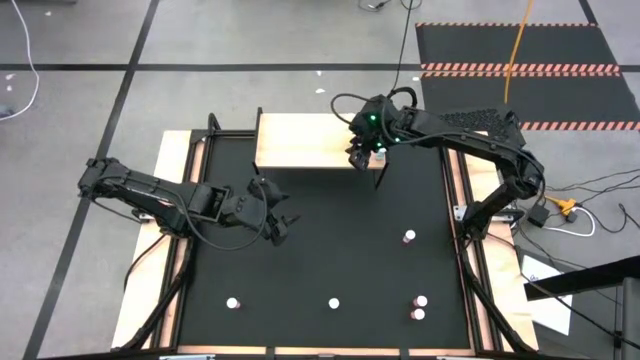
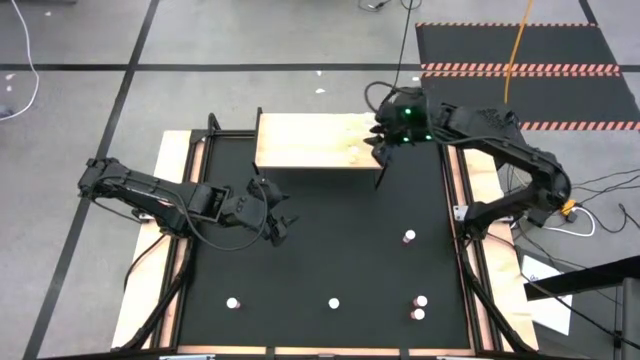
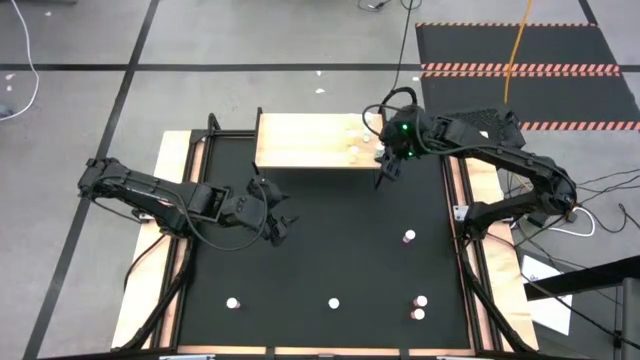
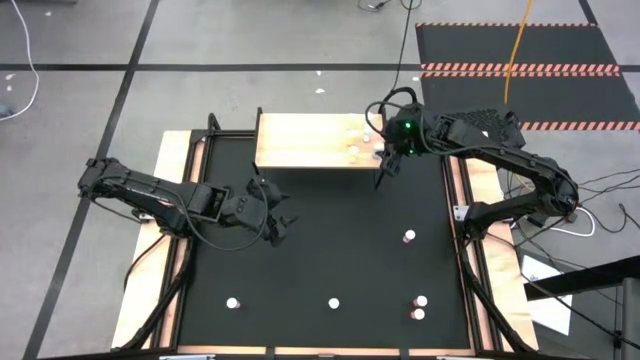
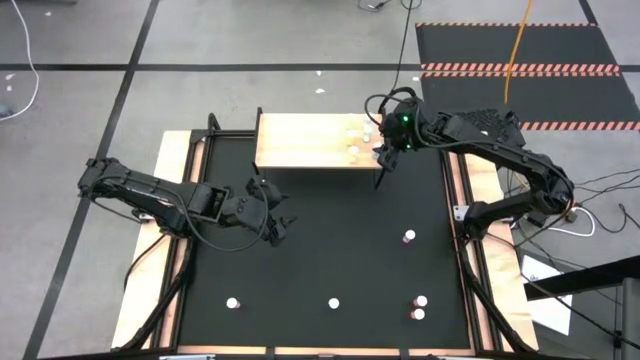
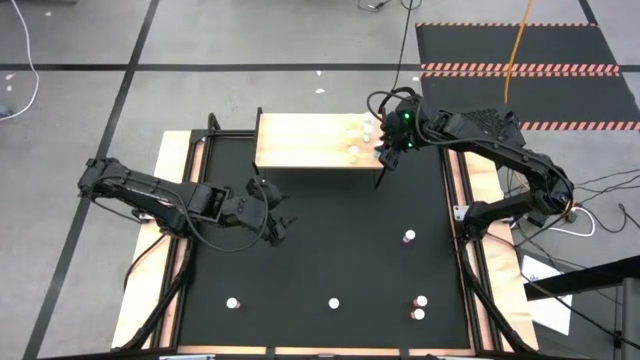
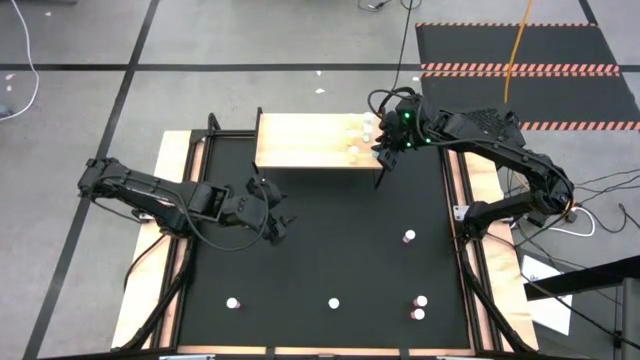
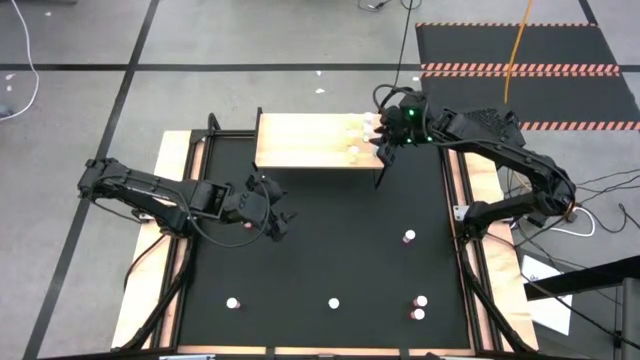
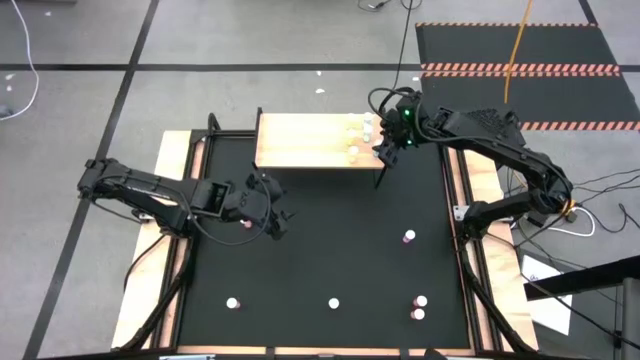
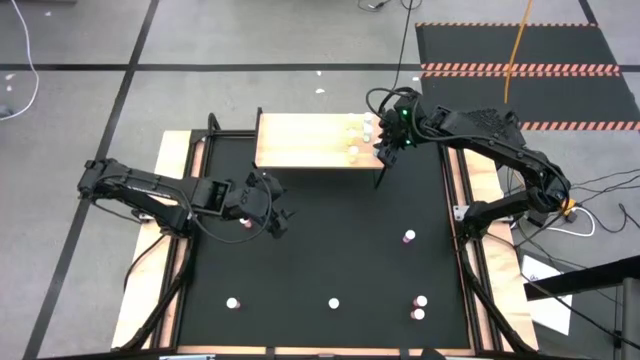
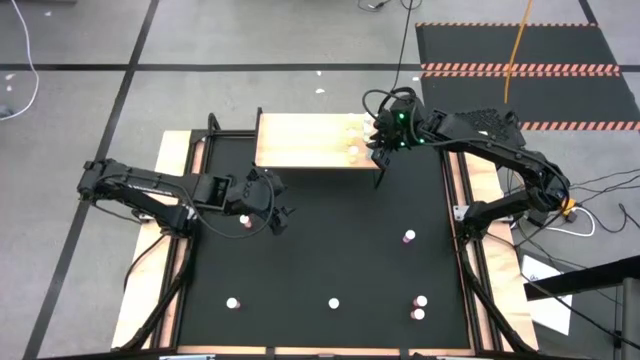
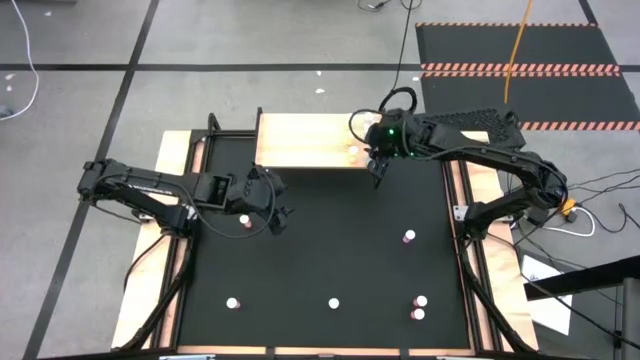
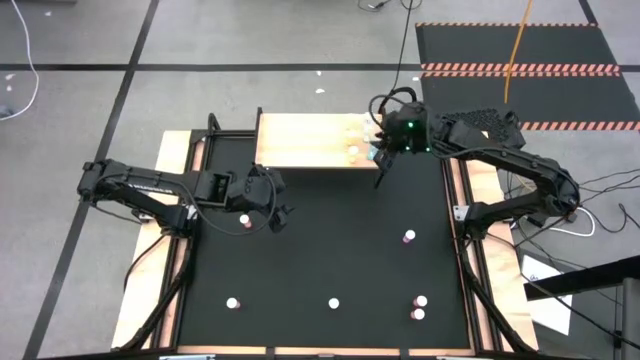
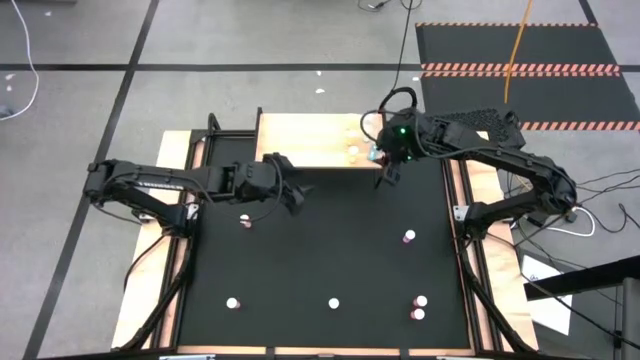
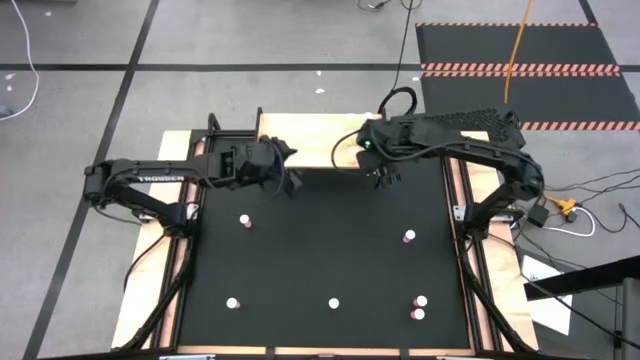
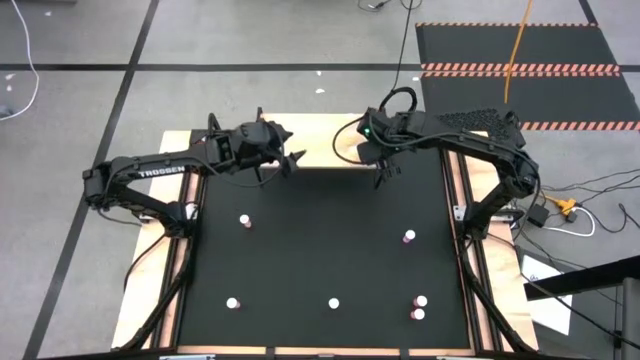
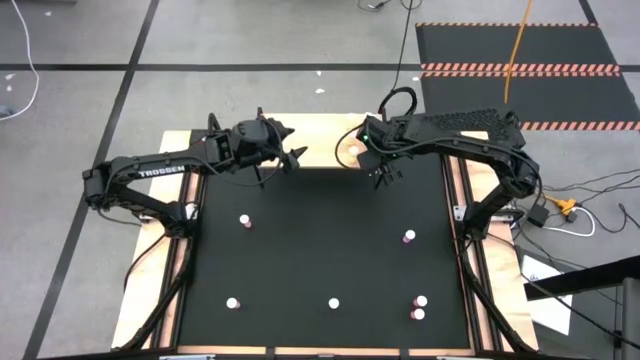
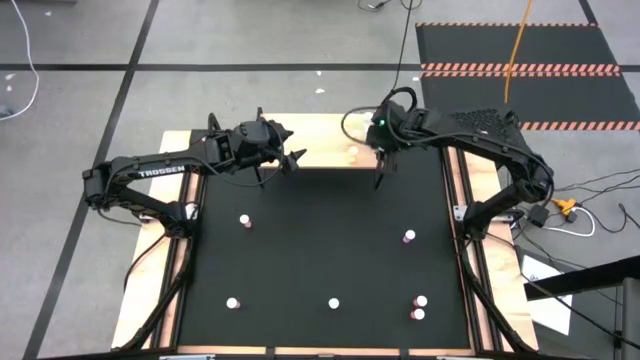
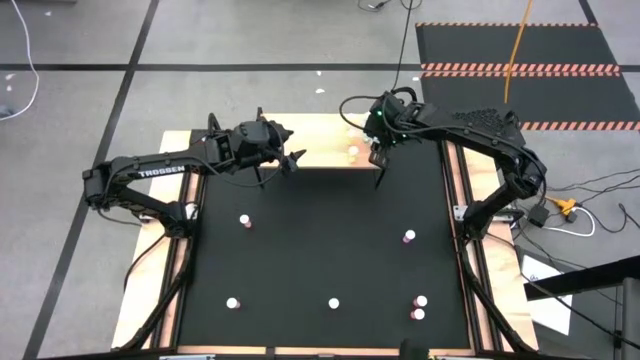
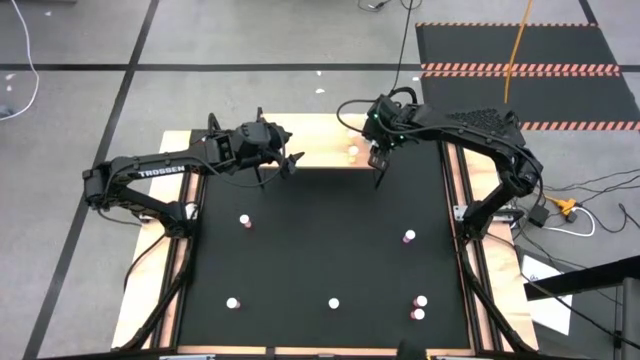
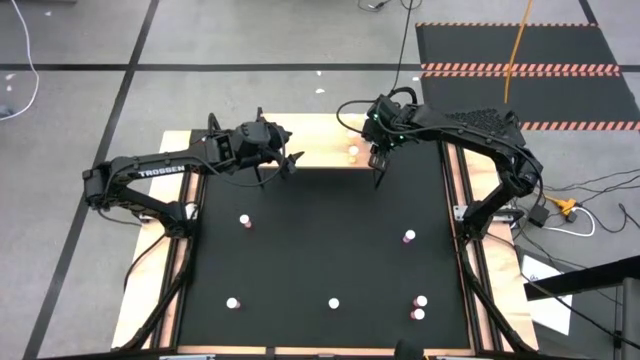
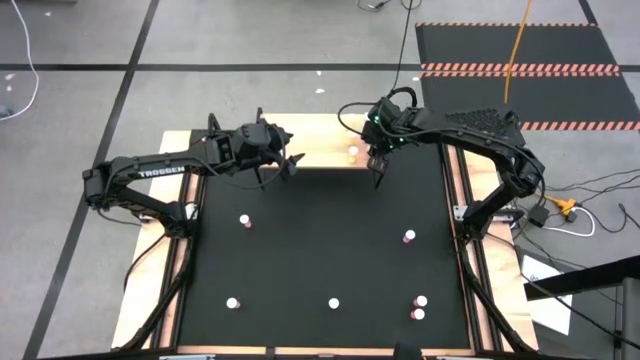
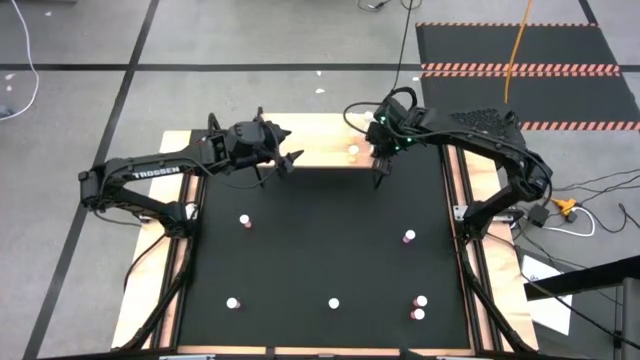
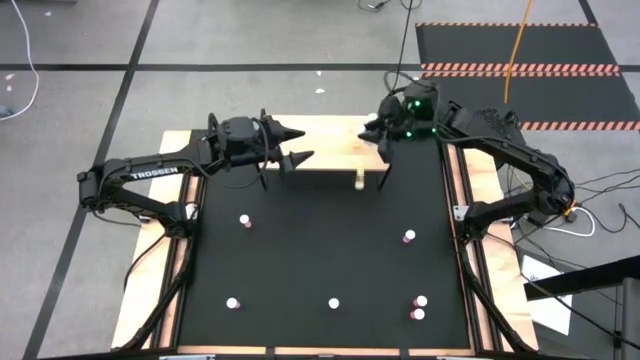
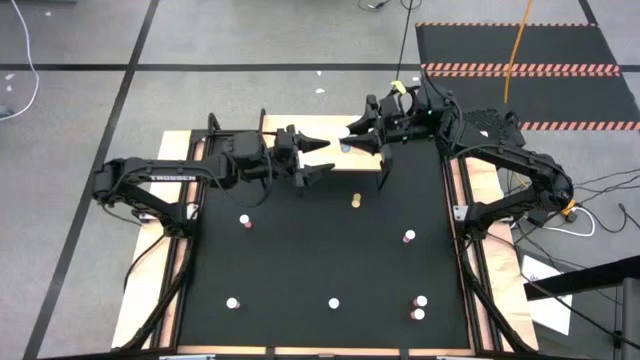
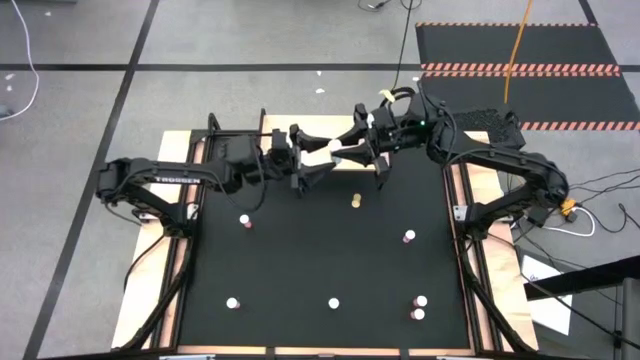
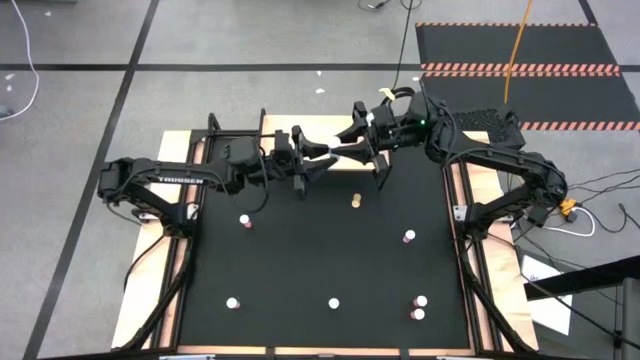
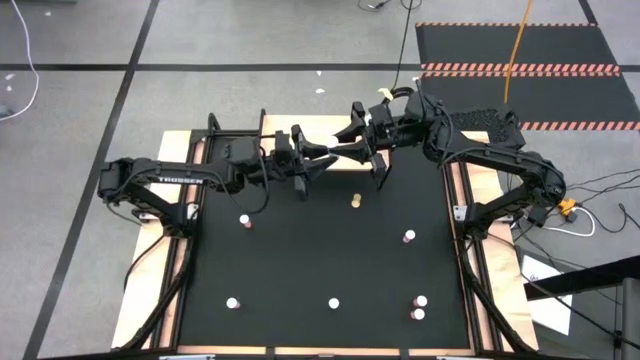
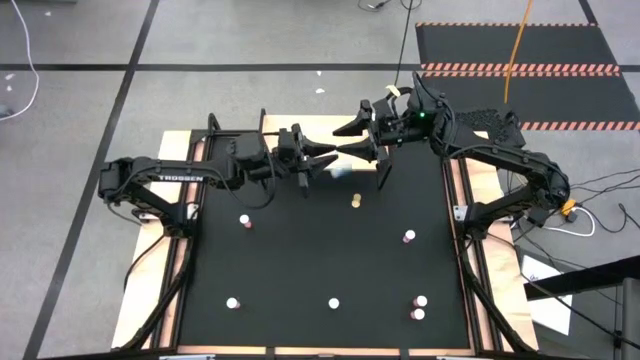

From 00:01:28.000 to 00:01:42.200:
Task: Pick and place medicine bottles onto shelf by color
Adjust the bottom blue pill bottle on the shelf

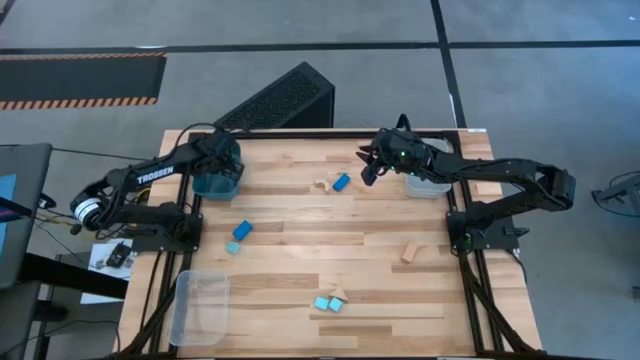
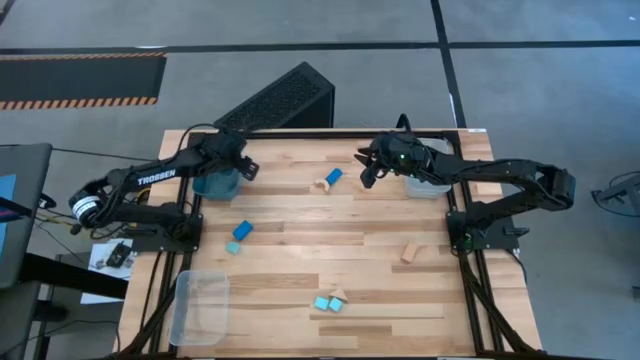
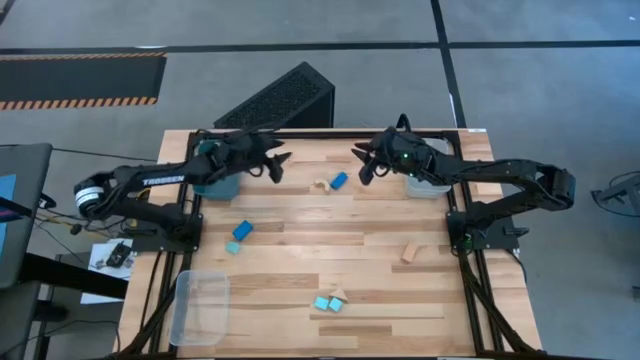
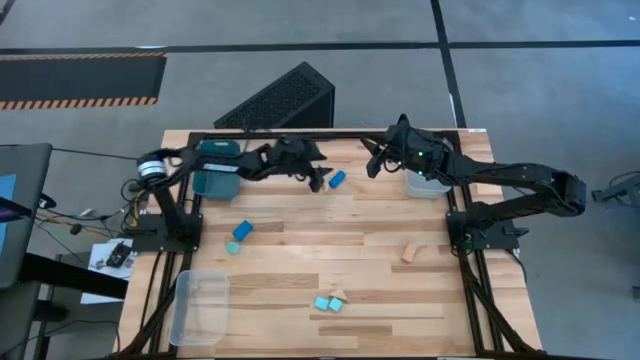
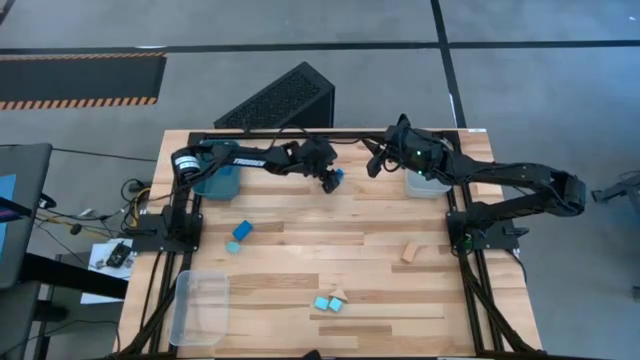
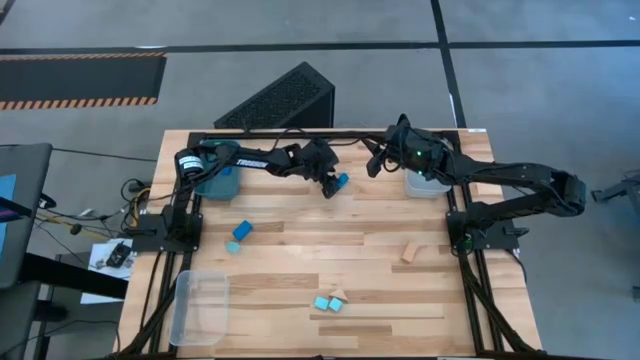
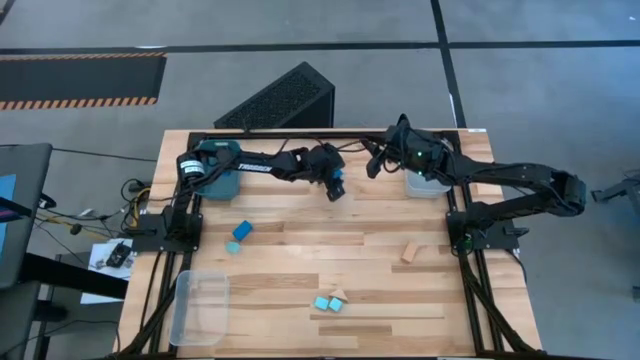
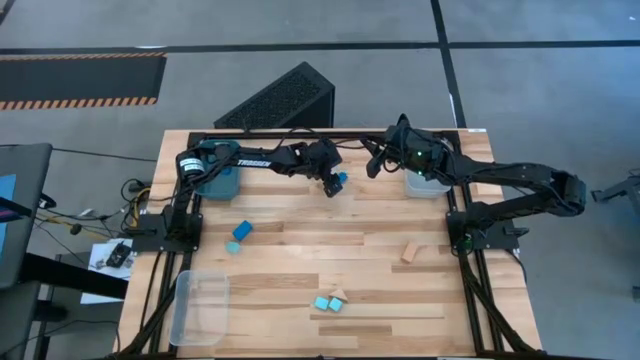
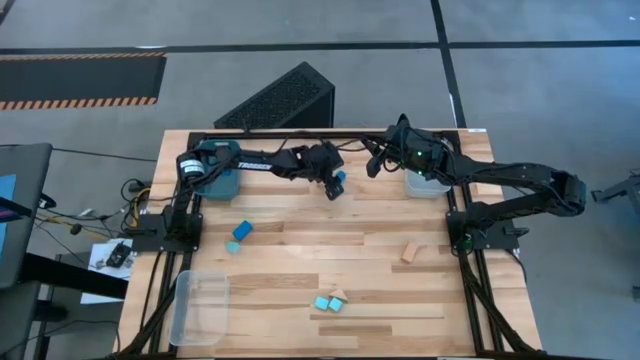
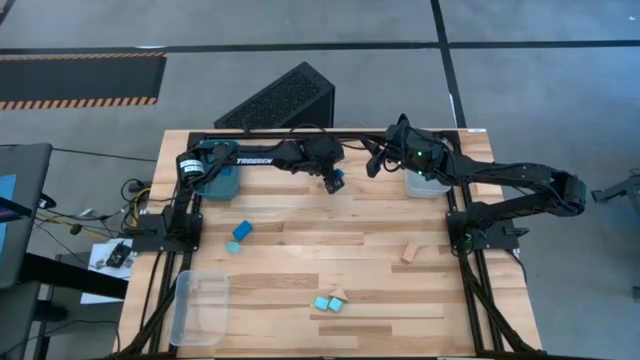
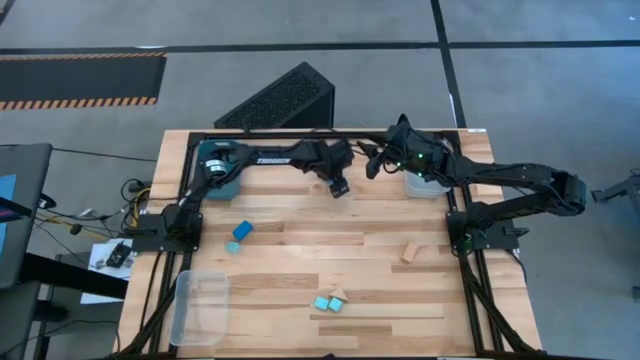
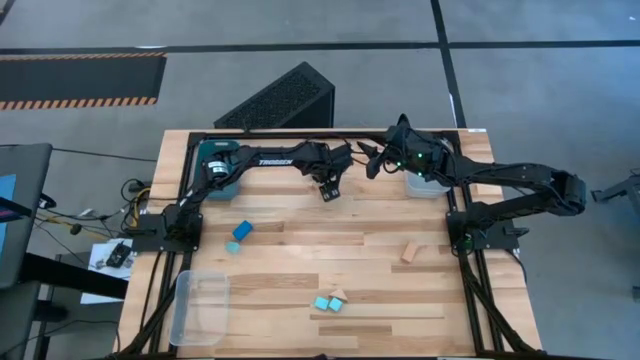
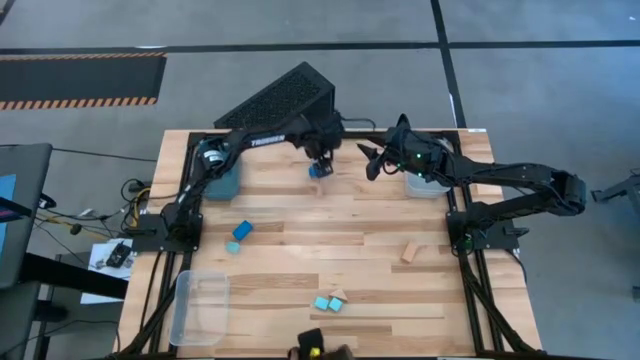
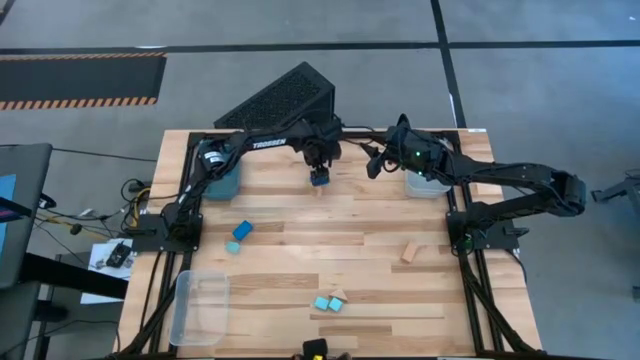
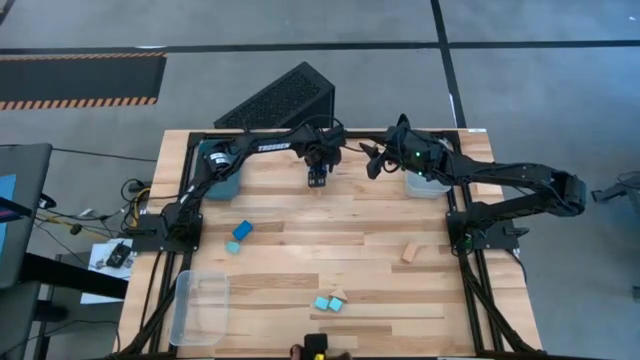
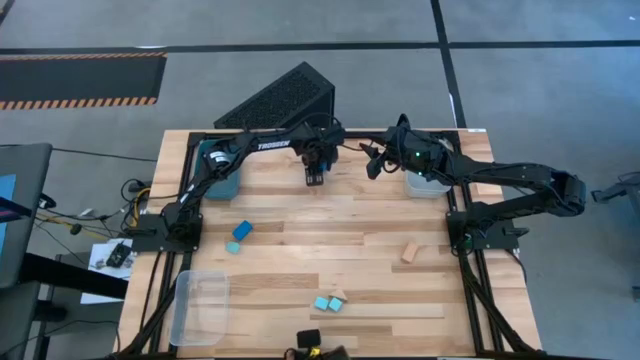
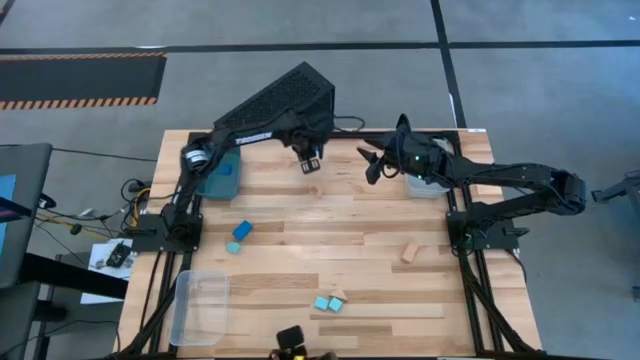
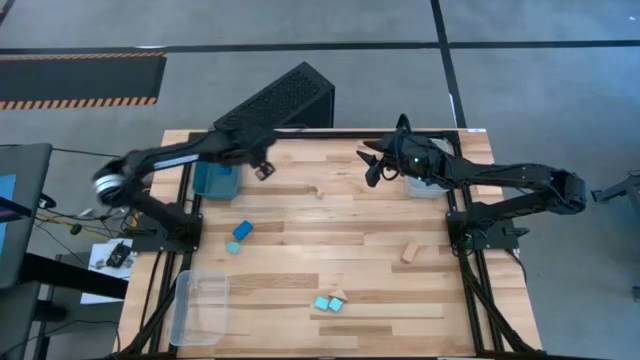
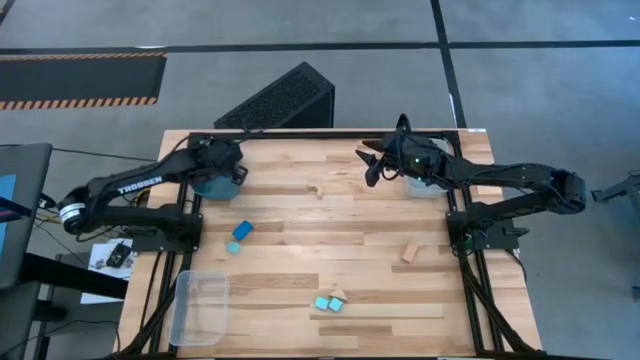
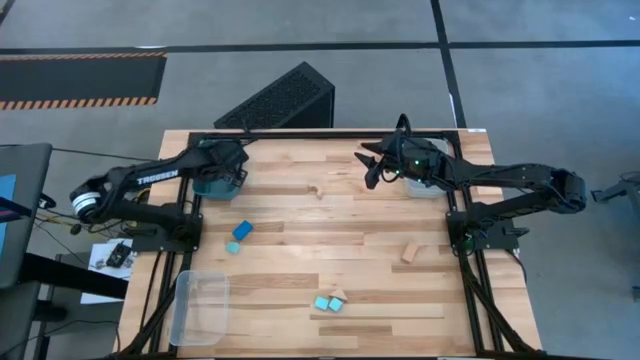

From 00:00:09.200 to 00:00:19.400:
Task: Sort & place blocks by color
Put the right blue block into the blue bin
